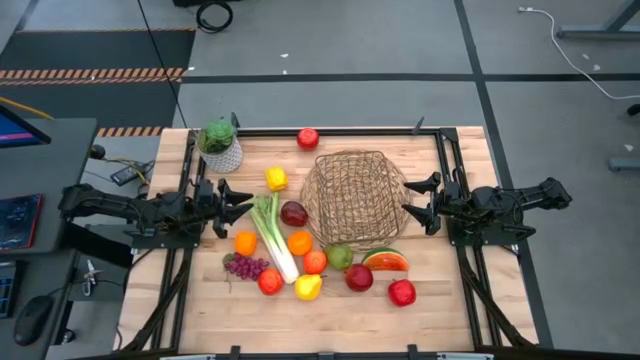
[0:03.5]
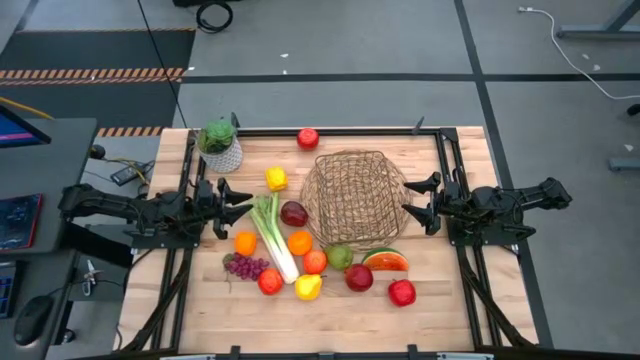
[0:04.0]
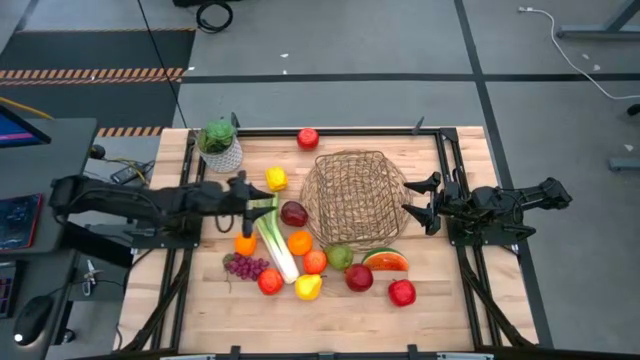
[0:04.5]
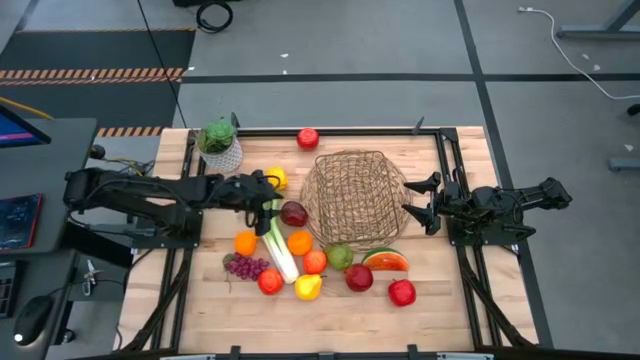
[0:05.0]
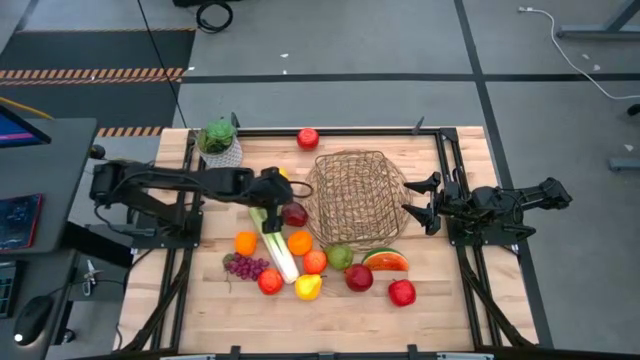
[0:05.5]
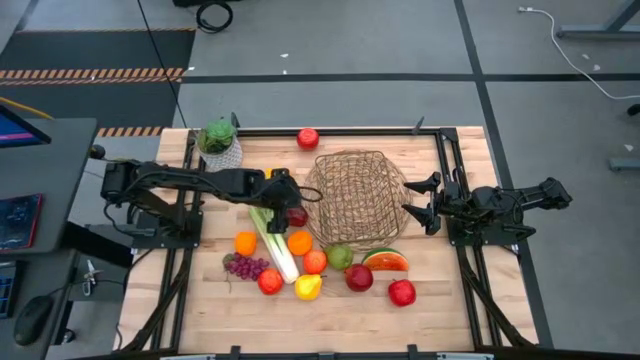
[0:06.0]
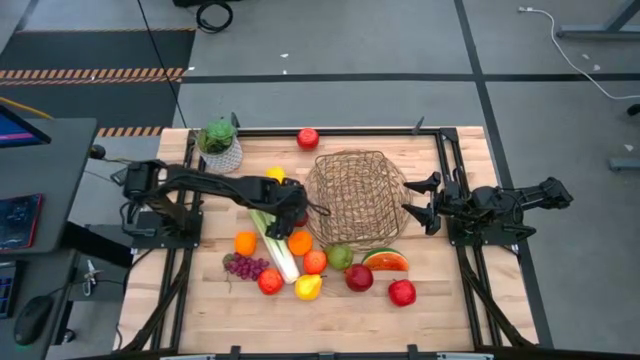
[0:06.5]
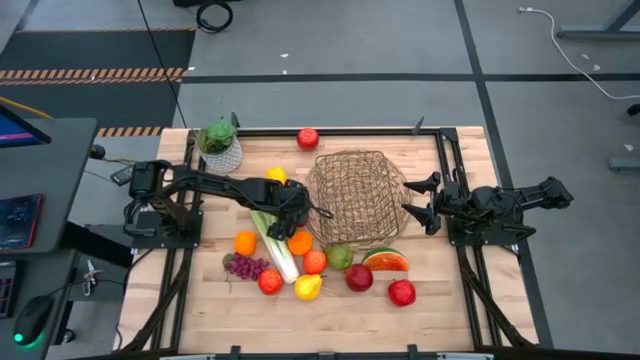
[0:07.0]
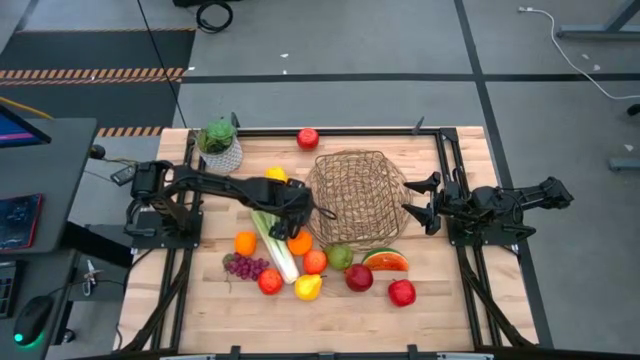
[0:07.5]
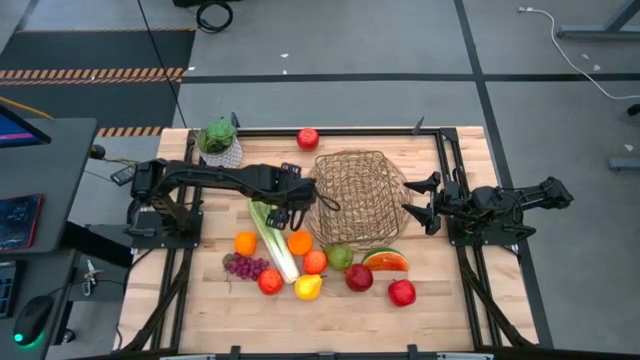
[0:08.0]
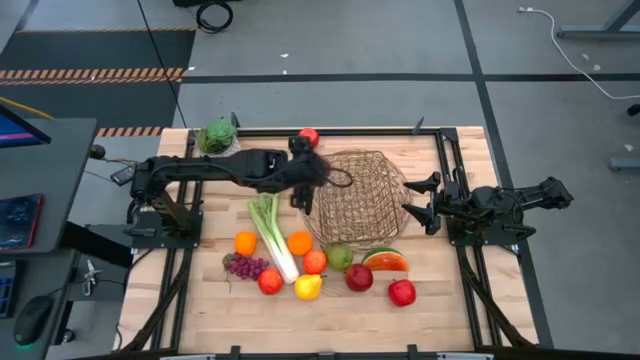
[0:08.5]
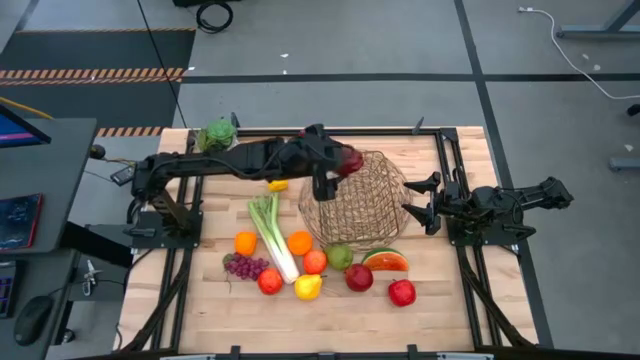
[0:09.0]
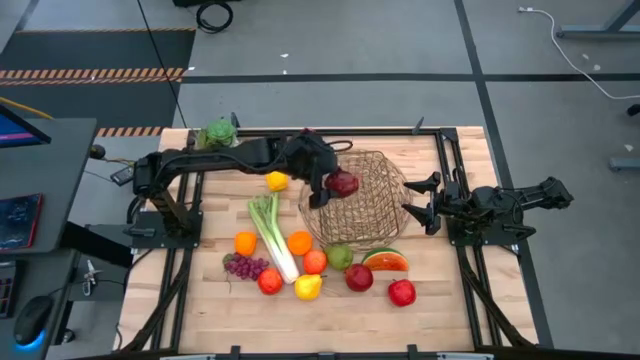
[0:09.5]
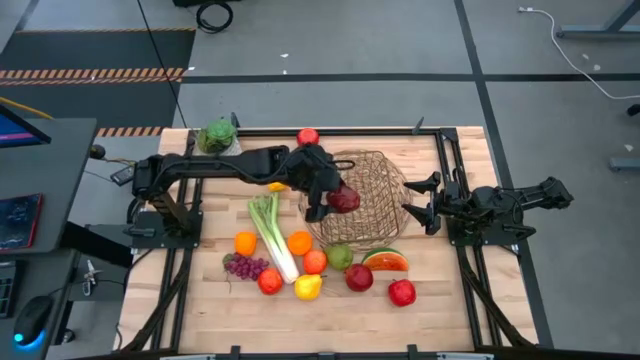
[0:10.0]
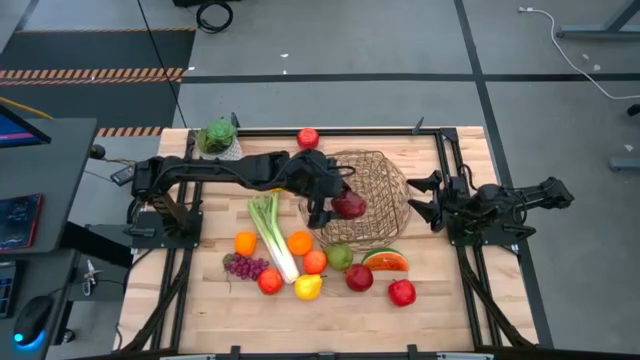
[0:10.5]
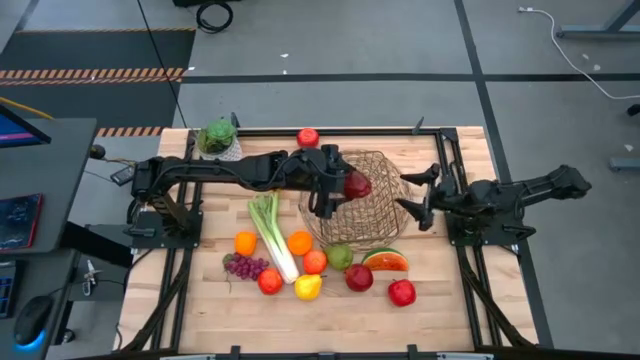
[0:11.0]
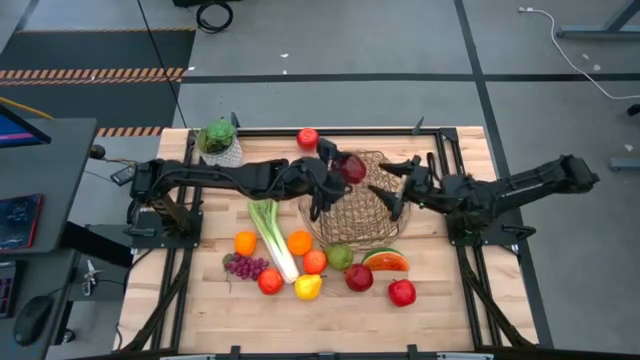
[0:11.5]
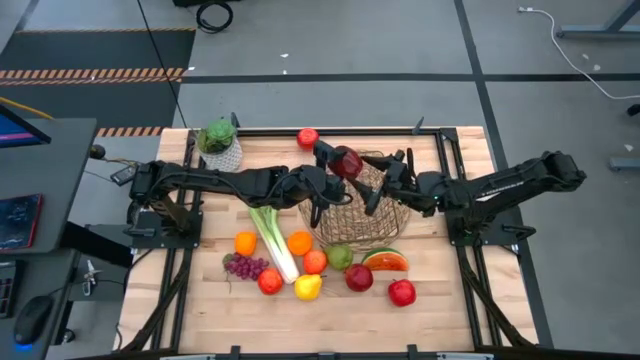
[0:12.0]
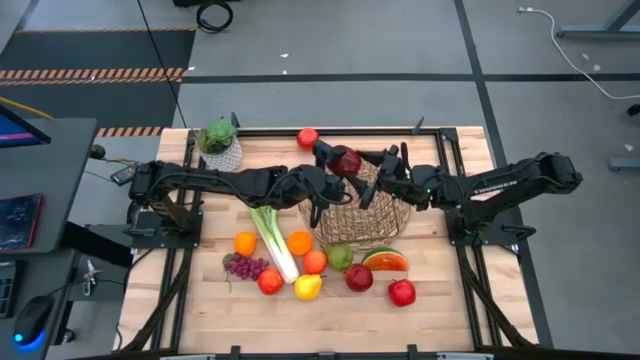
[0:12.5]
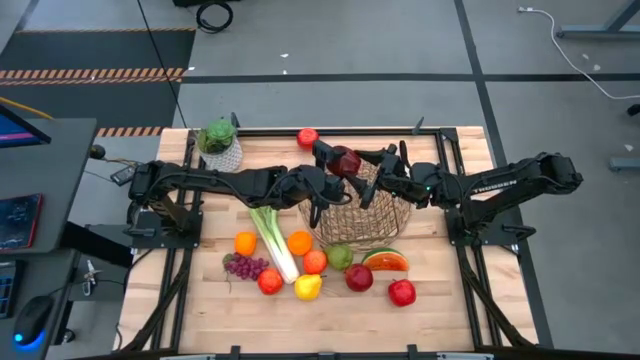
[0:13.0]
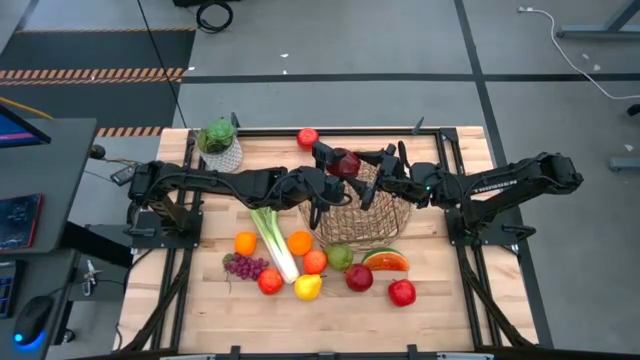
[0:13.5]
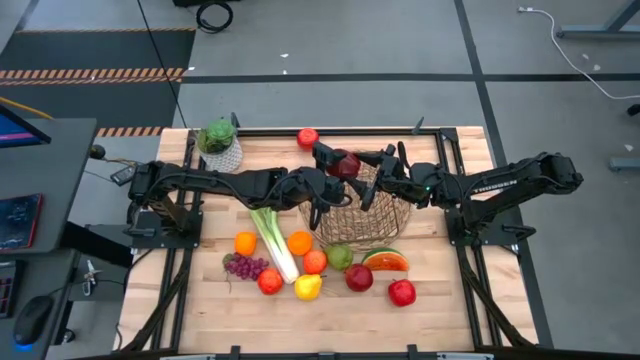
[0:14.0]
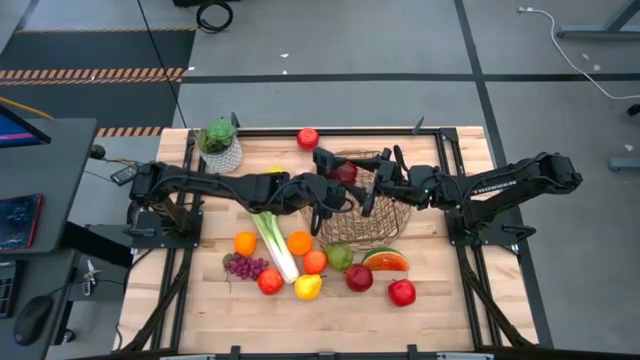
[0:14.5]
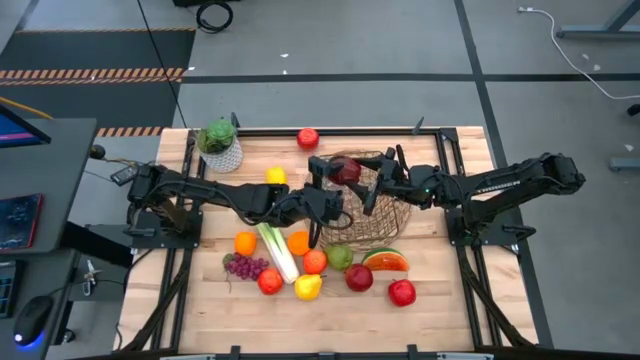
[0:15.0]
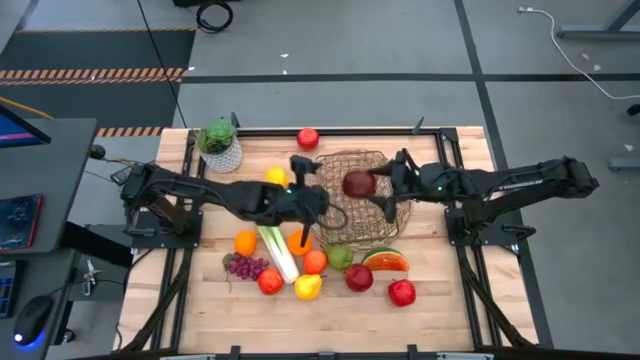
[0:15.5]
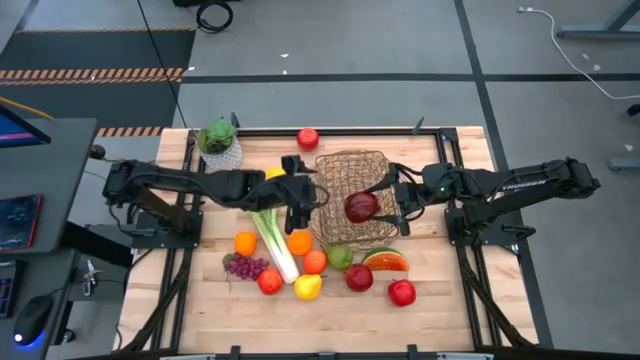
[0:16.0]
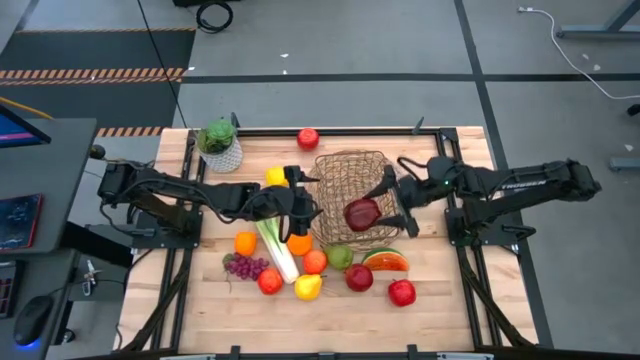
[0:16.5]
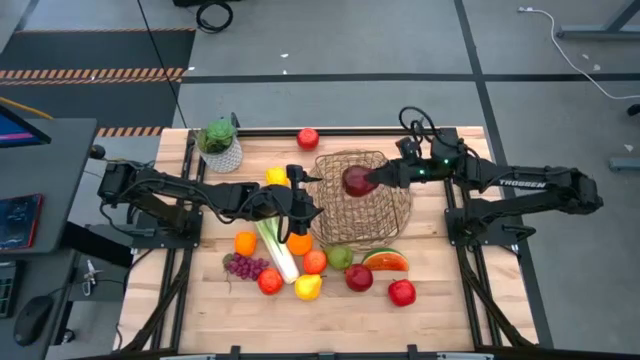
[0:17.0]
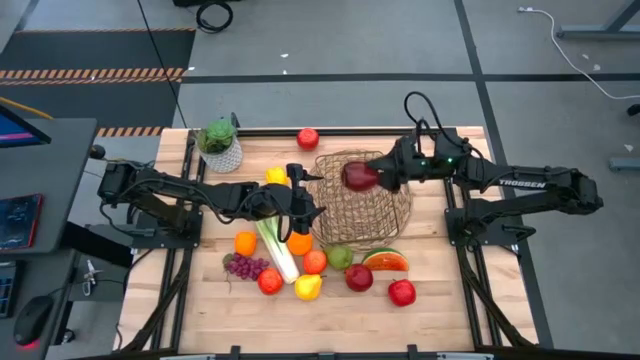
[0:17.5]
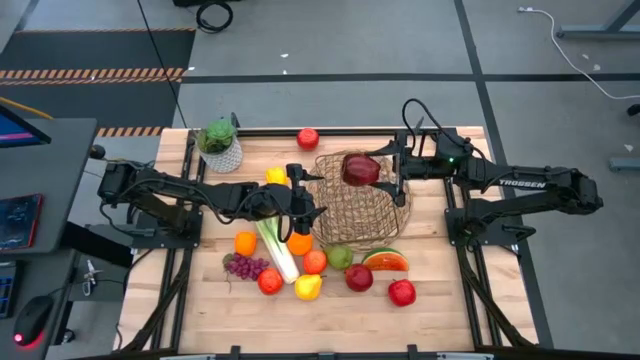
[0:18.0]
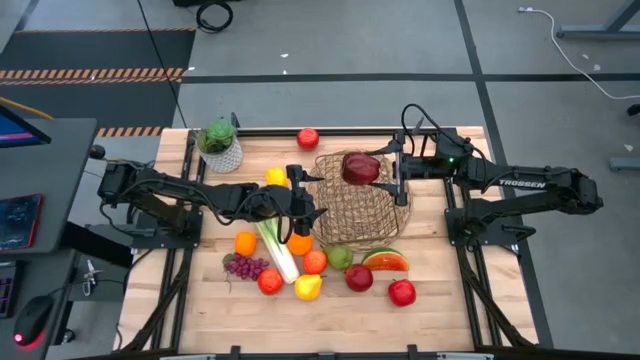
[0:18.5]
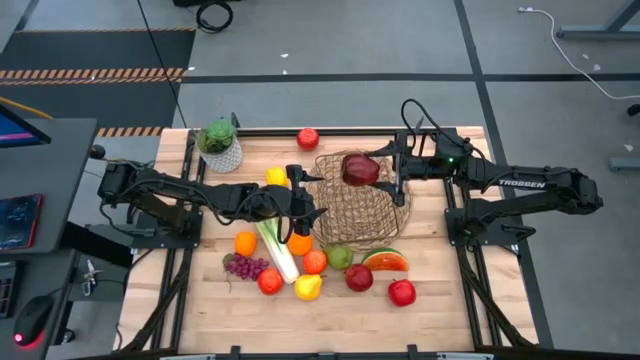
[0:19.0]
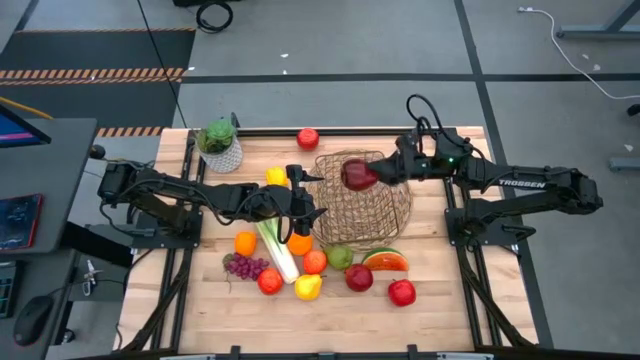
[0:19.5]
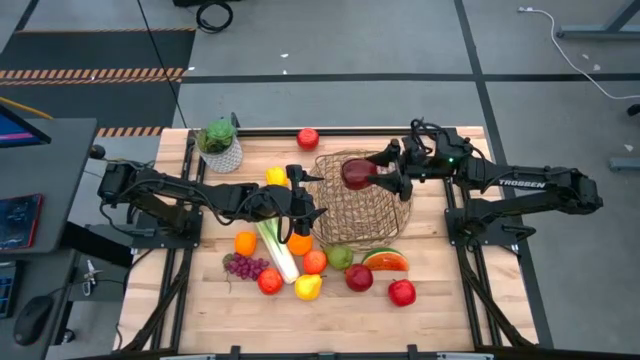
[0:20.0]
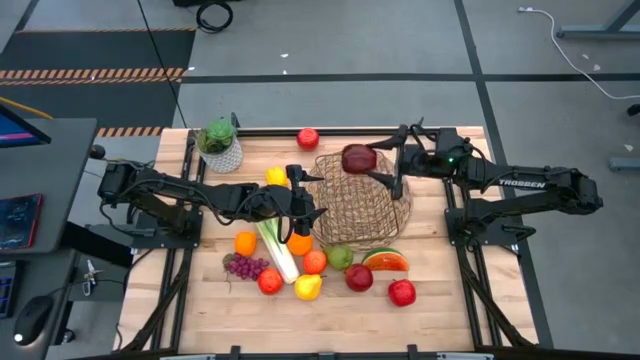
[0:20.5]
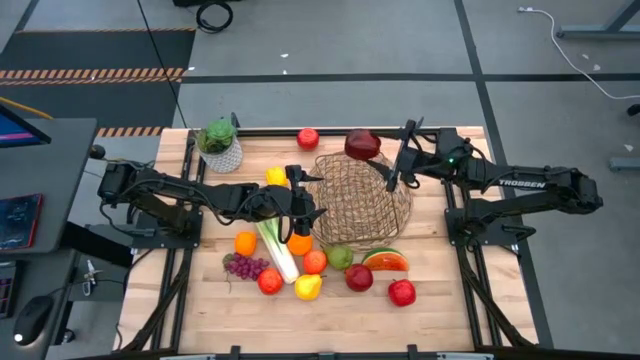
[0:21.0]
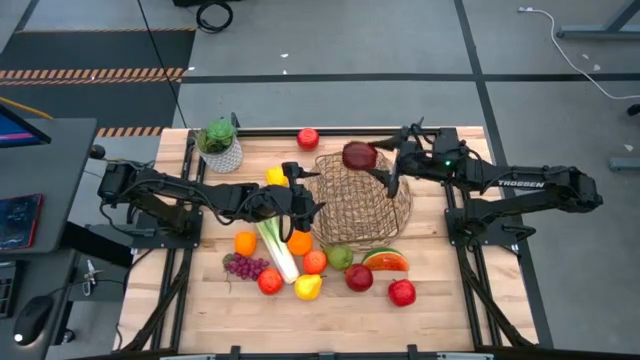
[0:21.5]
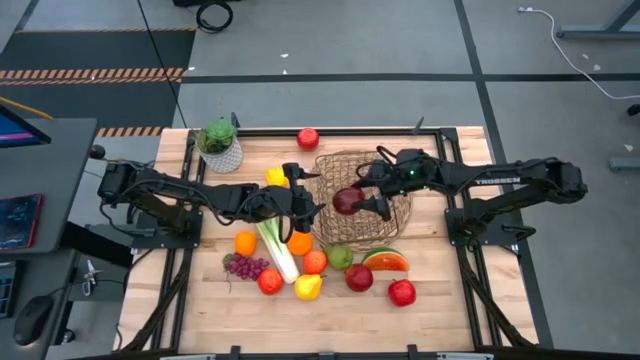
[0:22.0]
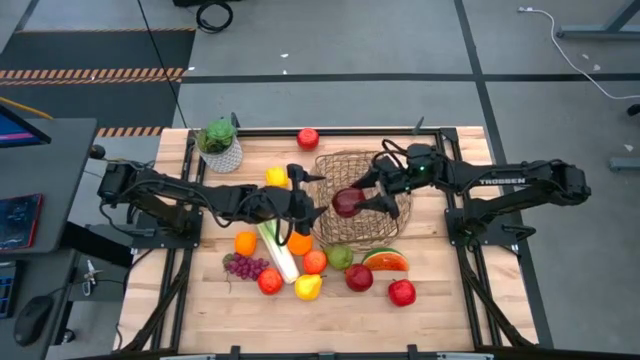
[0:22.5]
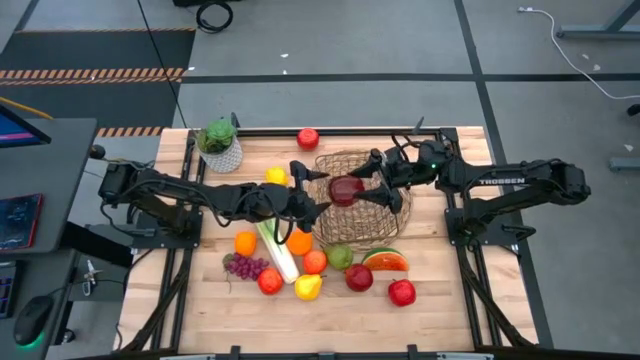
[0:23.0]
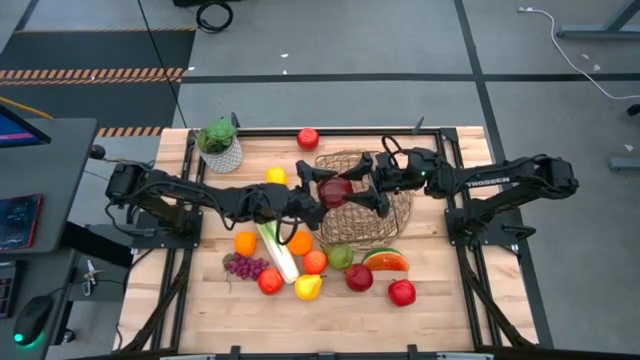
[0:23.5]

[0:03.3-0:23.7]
Task: Build produce basket
Put the dark red apple into the brown wire basket
